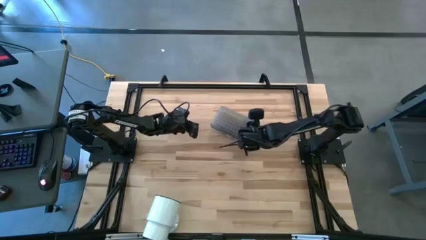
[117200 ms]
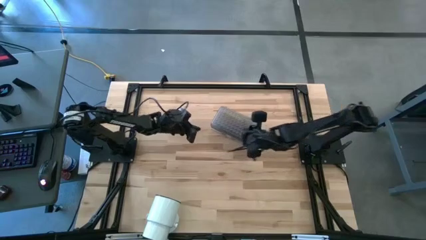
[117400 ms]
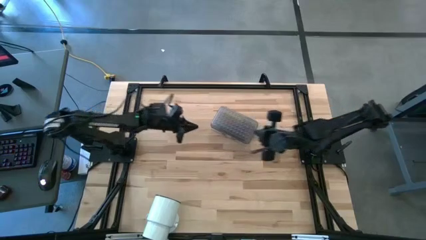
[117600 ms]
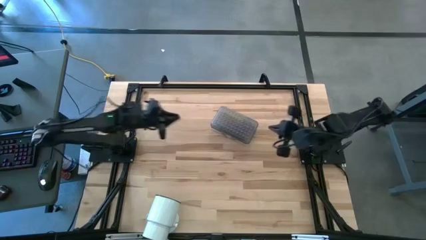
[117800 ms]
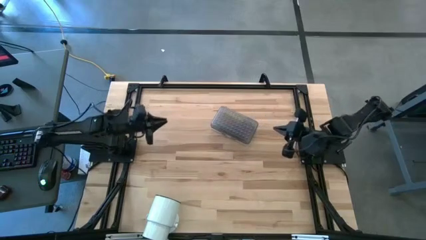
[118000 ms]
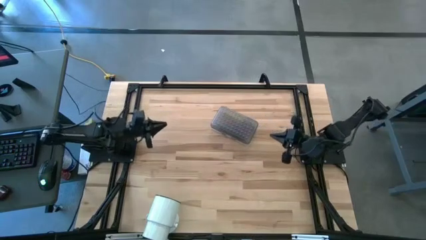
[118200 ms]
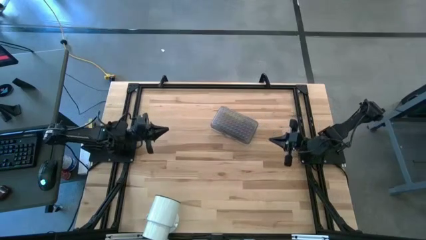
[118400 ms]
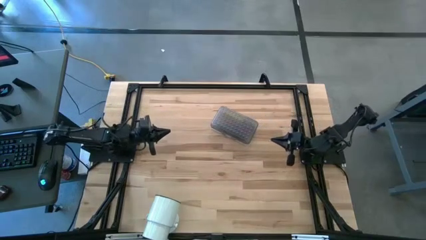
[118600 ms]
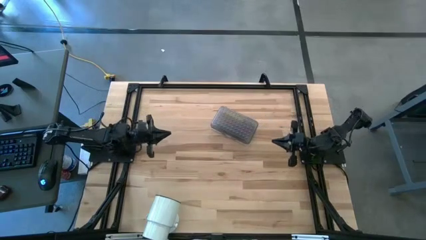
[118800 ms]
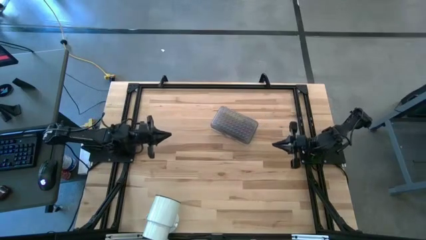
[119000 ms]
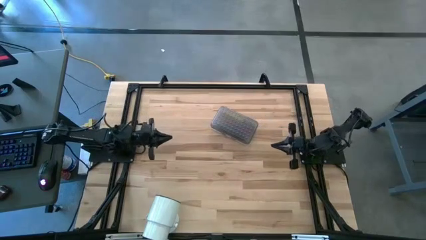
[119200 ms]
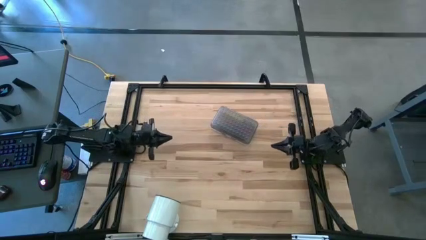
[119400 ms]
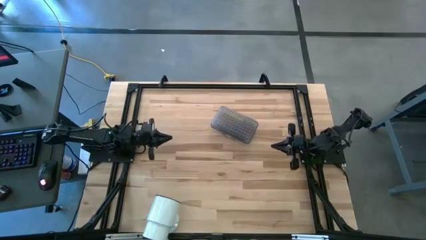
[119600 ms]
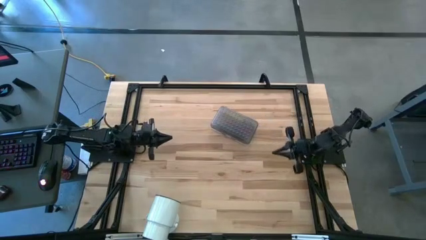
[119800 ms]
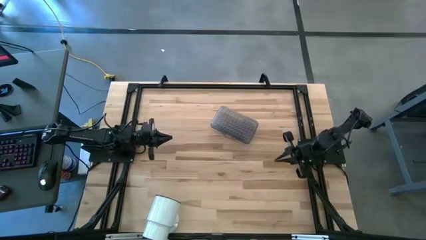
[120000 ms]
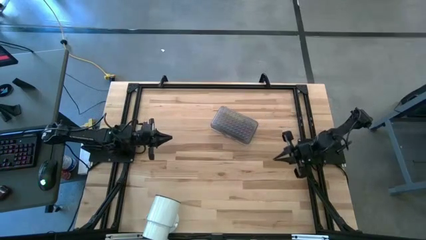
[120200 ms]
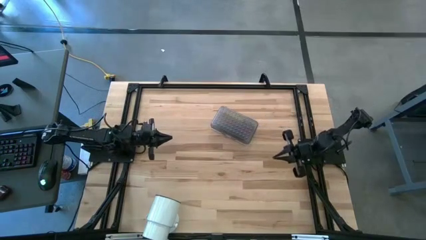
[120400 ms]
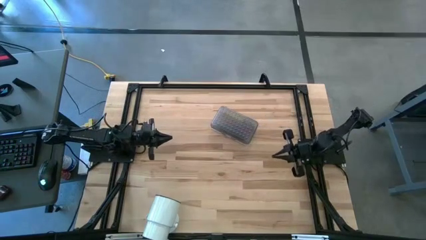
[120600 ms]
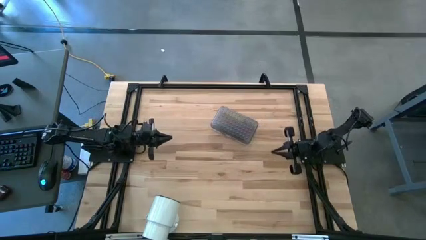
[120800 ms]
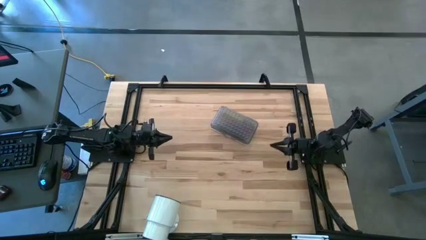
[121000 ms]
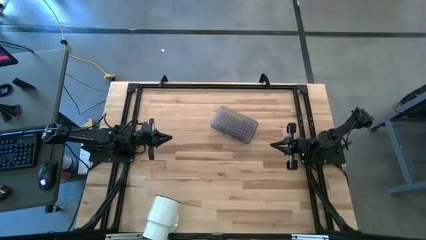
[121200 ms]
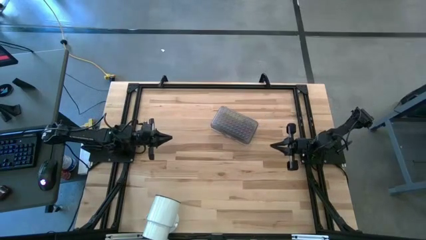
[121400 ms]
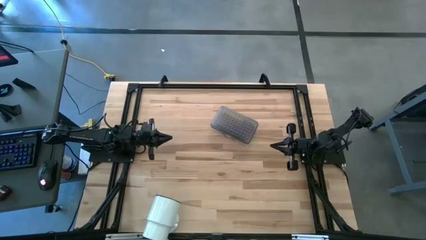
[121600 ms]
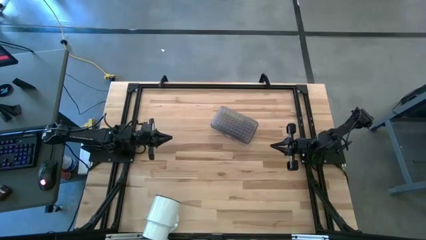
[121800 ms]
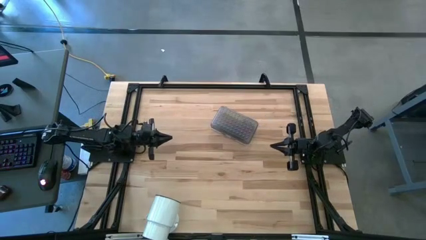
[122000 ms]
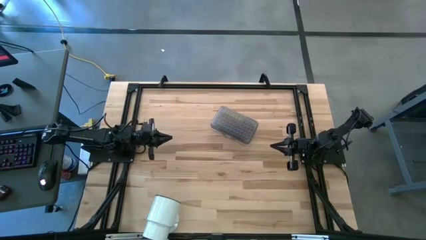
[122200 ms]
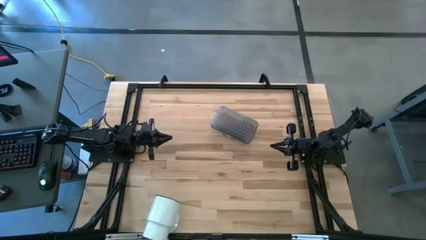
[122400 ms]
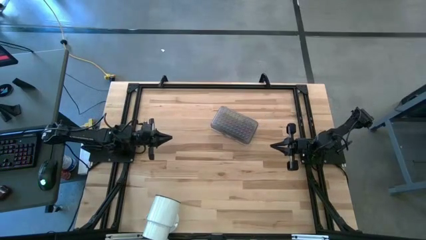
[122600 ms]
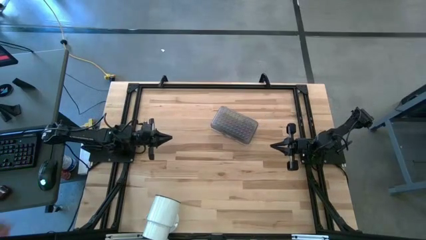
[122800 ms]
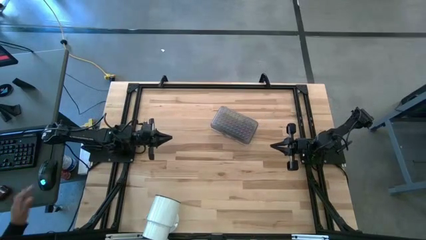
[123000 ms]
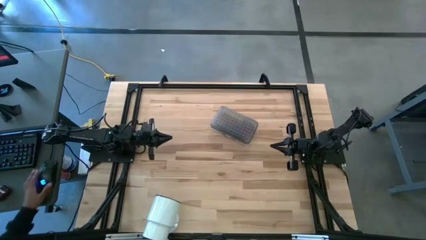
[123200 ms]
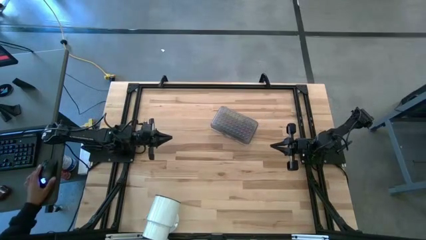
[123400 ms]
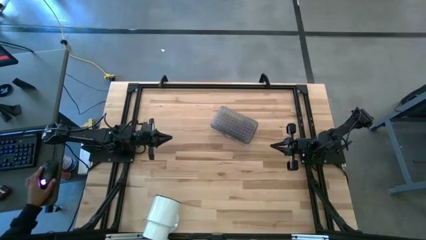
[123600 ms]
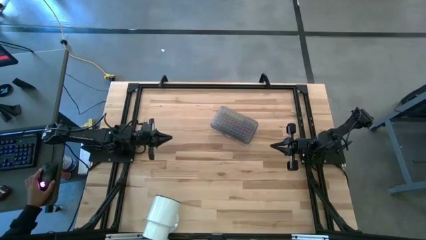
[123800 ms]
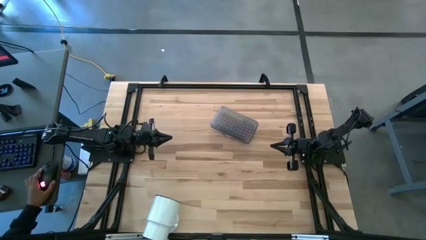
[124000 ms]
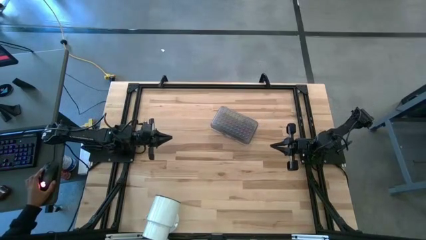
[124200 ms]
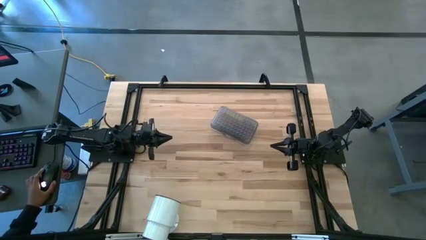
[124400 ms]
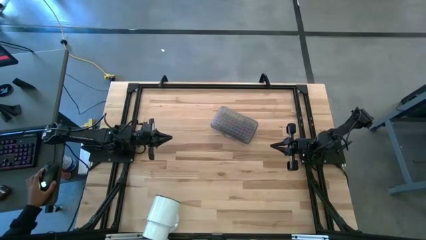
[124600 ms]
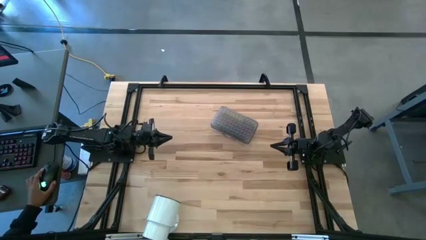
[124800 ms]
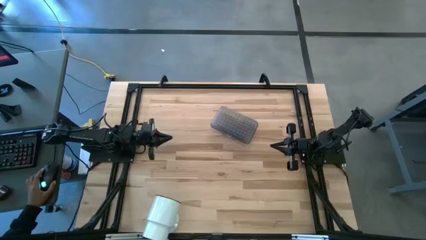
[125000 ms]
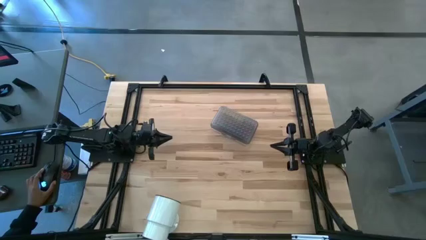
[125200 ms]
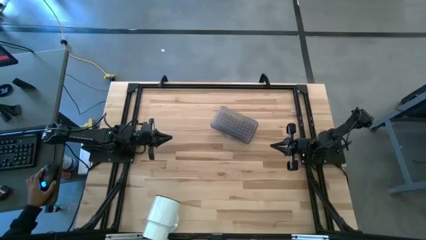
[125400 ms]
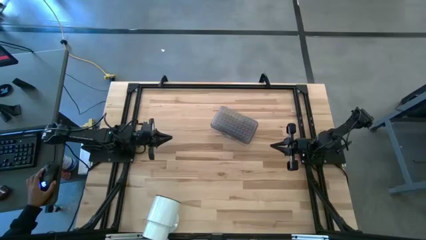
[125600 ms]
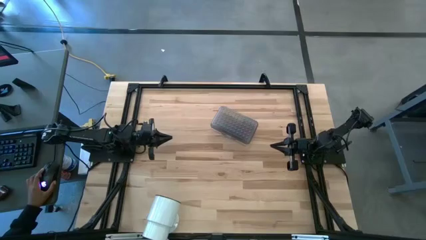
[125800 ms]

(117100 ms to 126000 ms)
Task: Pick & place school supplies into a supply box
Return to Home Position

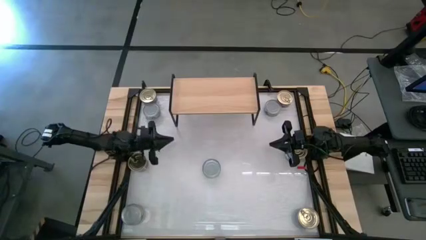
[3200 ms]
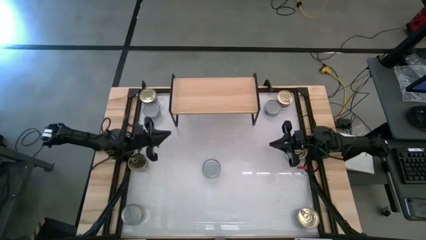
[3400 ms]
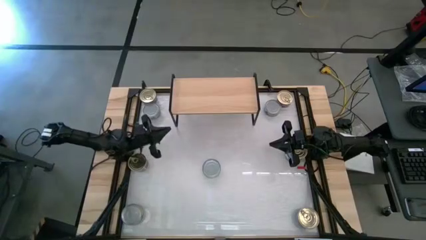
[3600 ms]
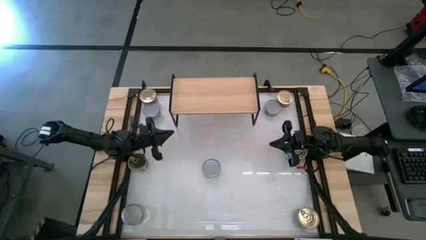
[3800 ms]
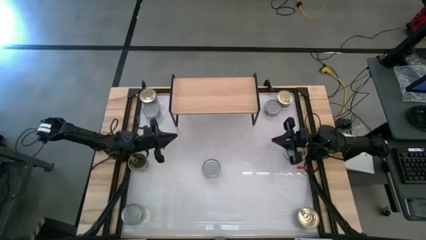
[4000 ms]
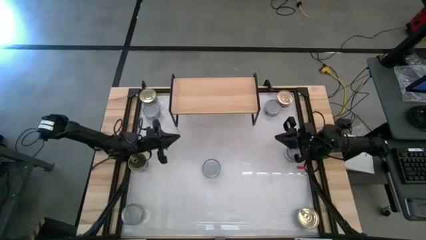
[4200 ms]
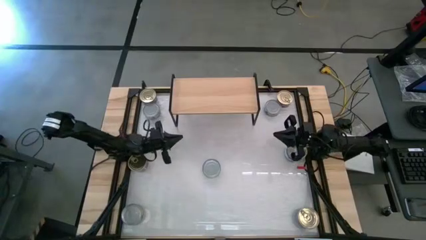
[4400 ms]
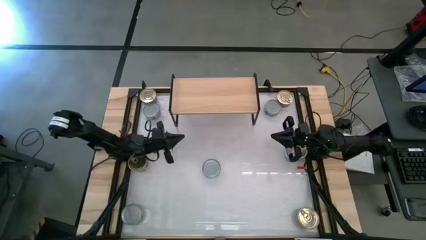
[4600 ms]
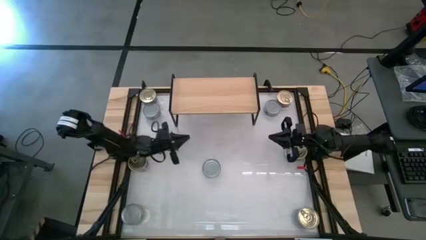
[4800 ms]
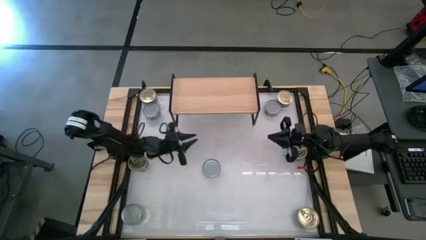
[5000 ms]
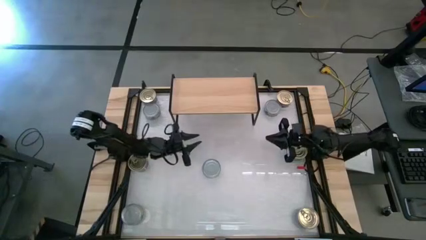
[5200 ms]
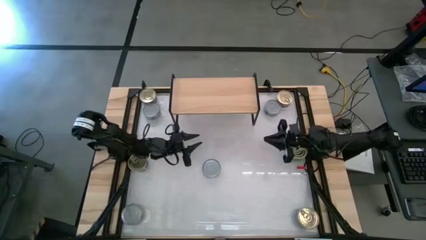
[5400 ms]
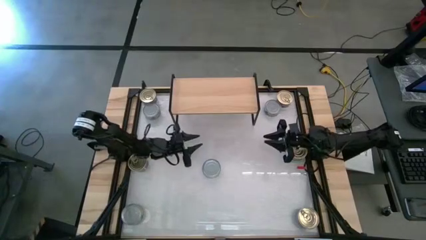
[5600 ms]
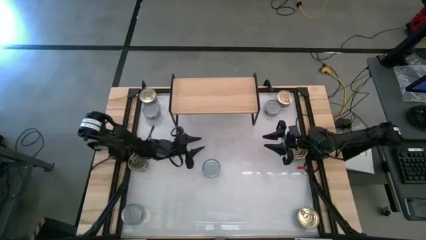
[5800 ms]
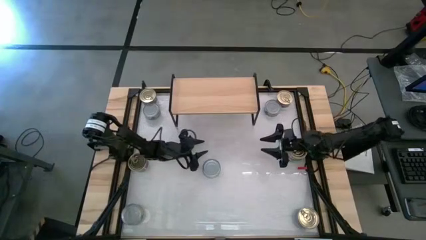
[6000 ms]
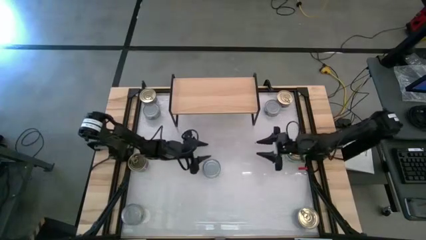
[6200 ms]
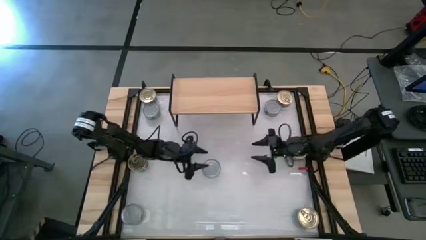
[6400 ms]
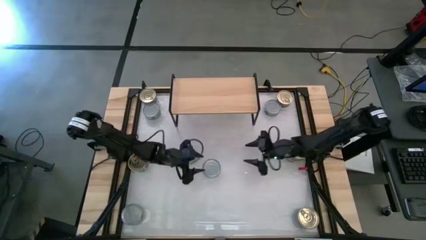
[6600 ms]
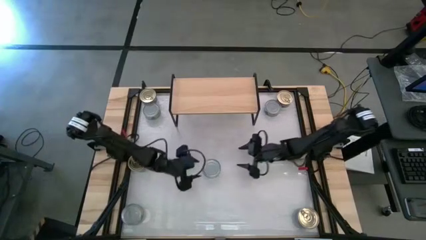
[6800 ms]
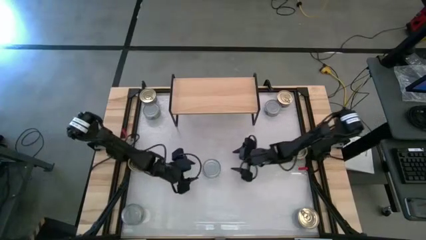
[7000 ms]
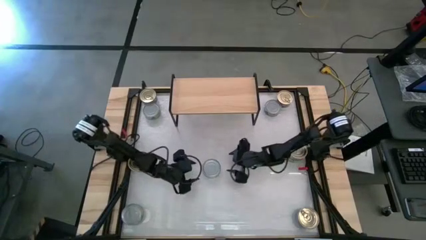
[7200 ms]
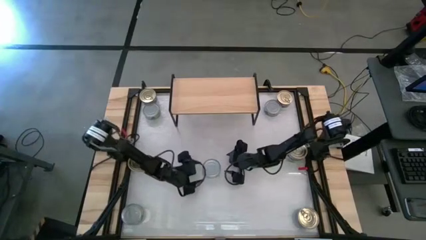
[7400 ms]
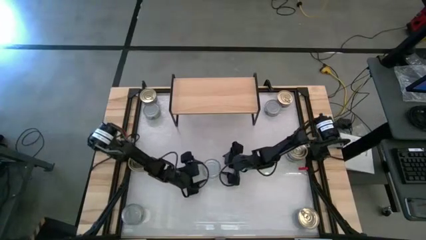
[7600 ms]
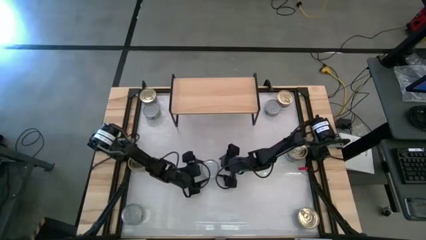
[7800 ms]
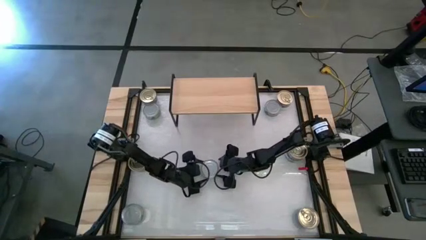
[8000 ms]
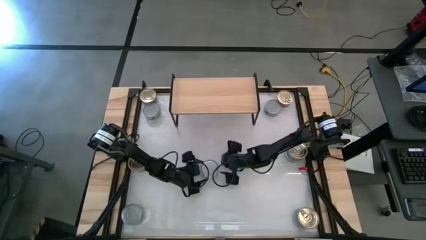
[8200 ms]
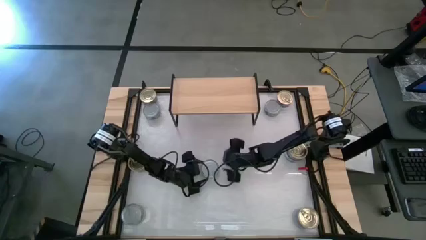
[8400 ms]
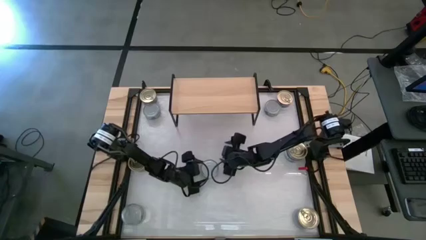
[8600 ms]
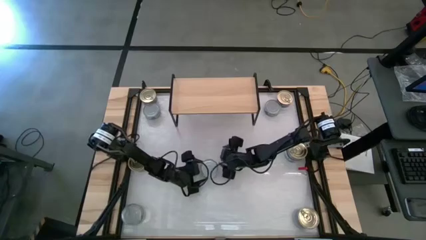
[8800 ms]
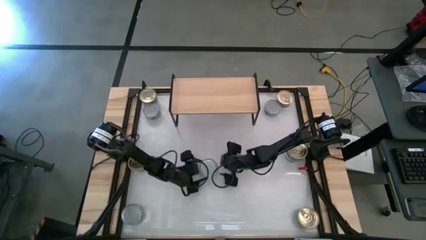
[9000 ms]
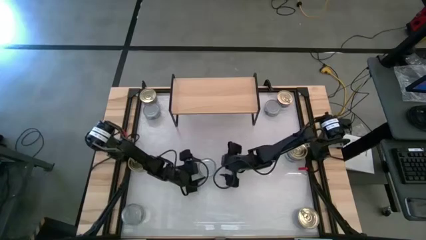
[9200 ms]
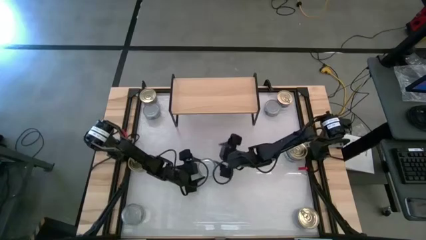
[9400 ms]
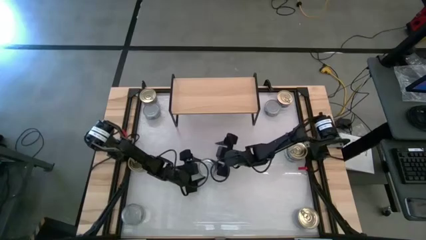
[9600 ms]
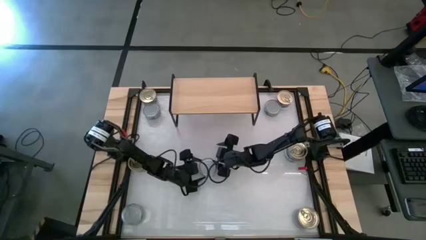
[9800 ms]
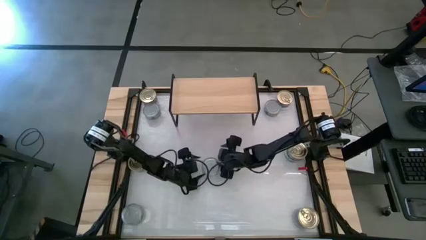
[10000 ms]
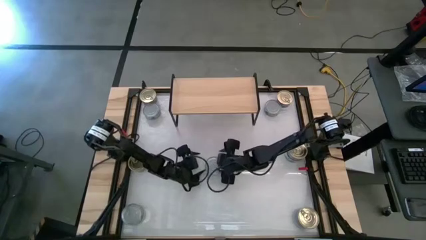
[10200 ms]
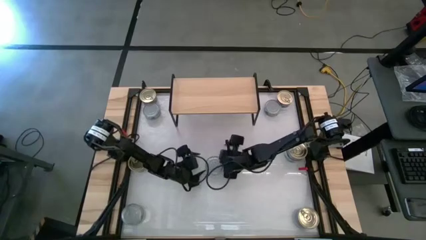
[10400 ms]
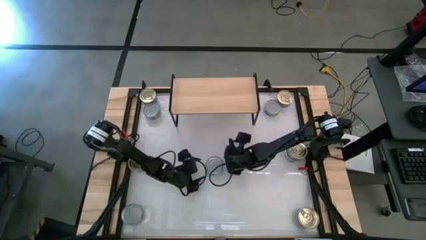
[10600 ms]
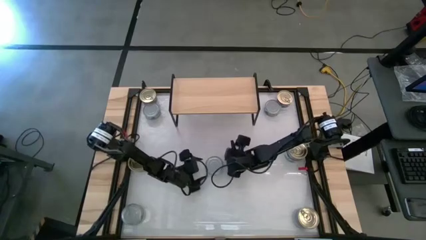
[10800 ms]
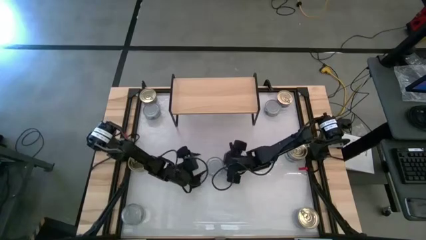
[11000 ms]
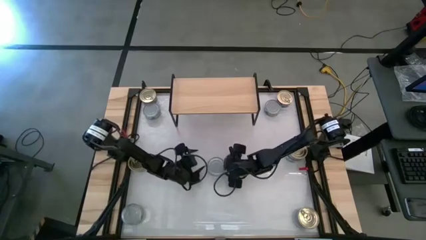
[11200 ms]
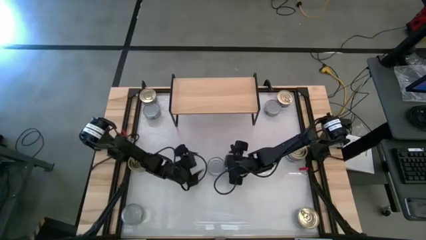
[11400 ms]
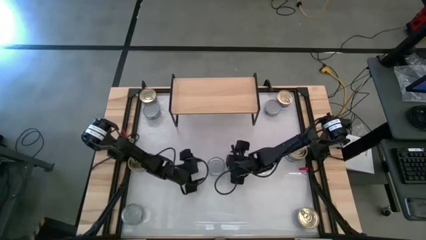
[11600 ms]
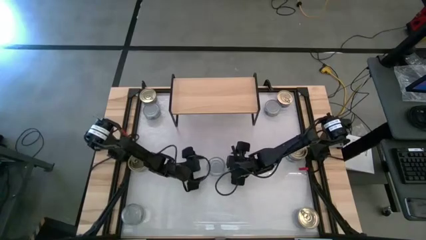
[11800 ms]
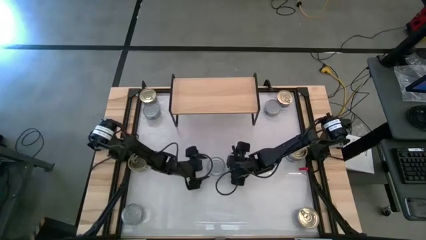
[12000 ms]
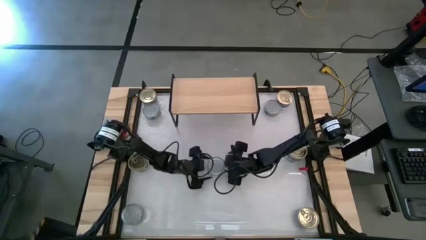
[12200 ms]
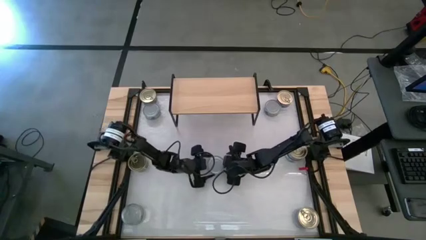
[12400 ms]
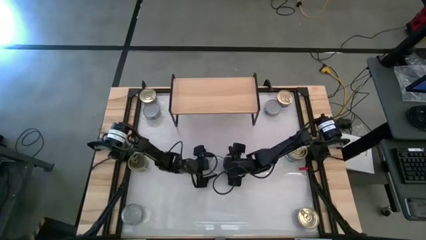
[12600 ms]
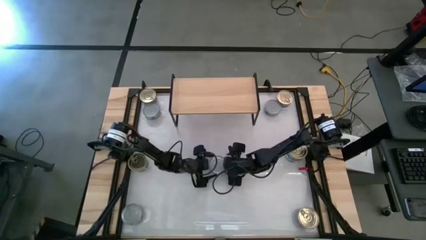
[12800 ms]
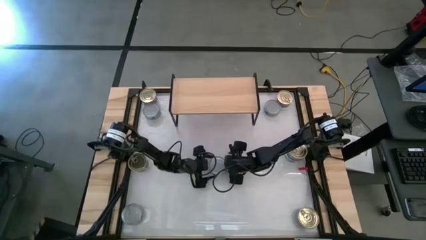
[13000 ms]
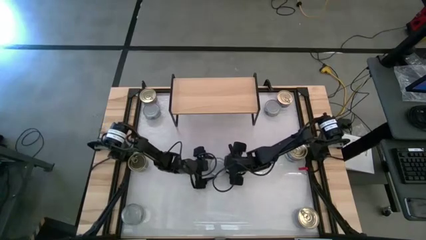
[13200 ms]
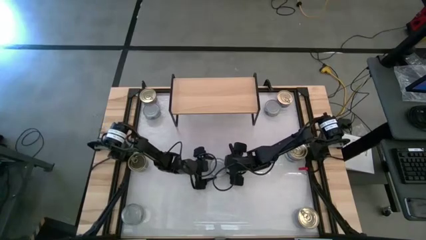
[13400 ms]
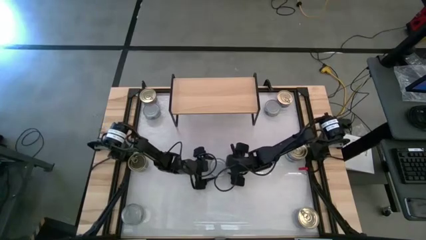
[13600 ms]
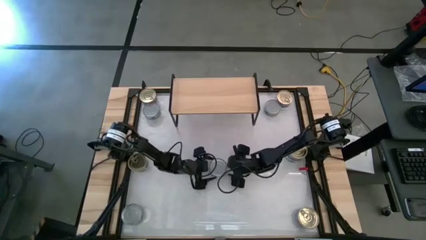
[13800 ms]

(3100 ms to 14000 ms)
Task: Stack canned seafood by type on shelf
Put the green tuna can on the shelf
